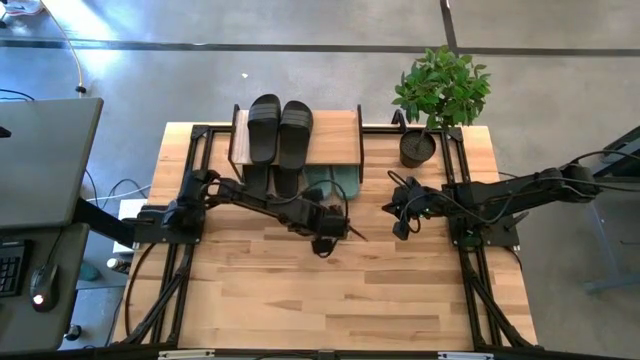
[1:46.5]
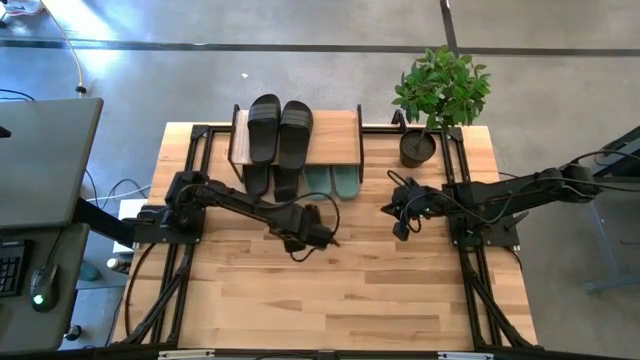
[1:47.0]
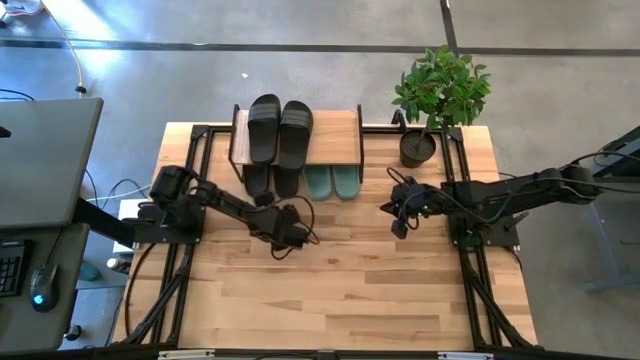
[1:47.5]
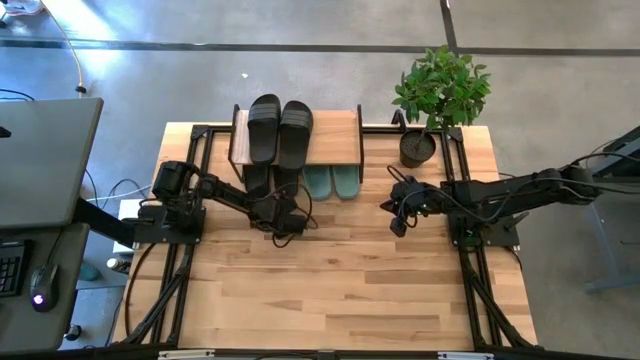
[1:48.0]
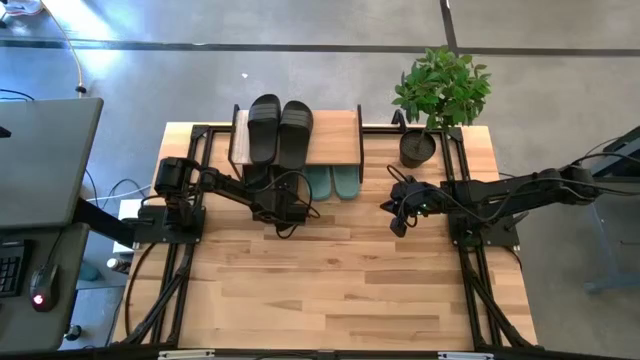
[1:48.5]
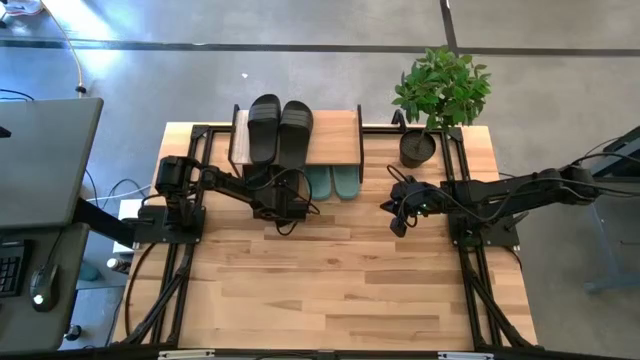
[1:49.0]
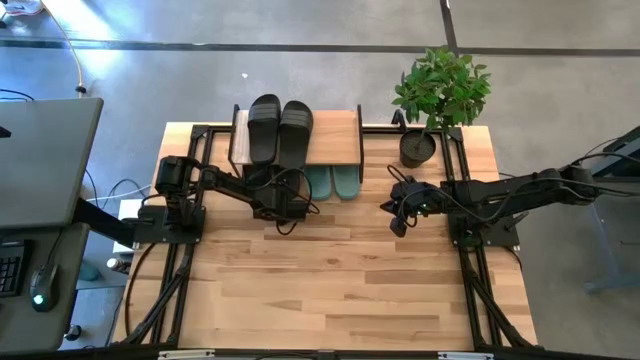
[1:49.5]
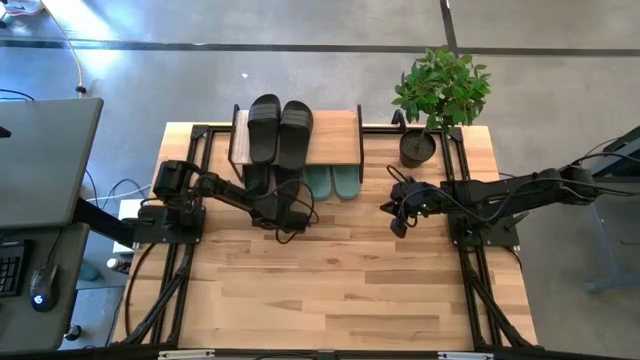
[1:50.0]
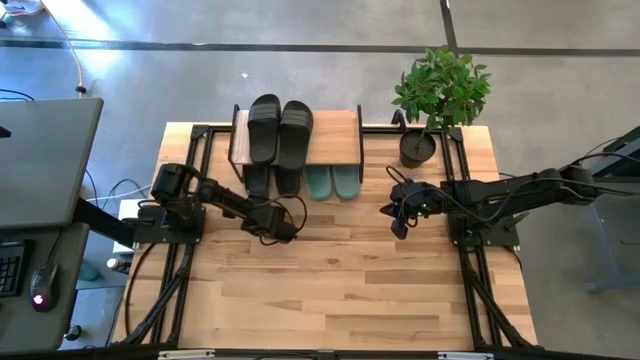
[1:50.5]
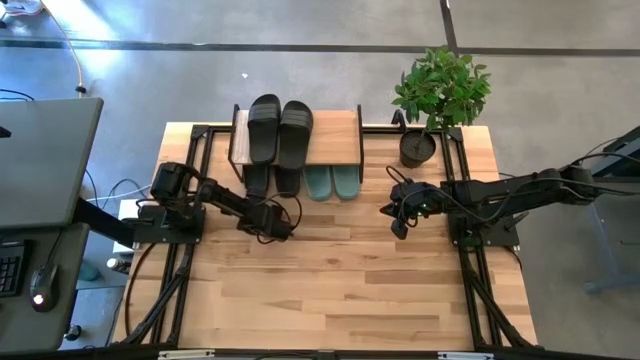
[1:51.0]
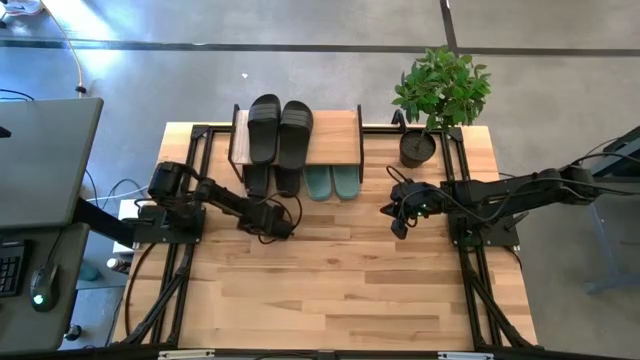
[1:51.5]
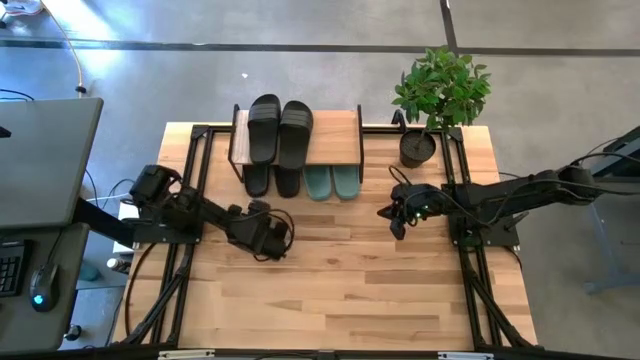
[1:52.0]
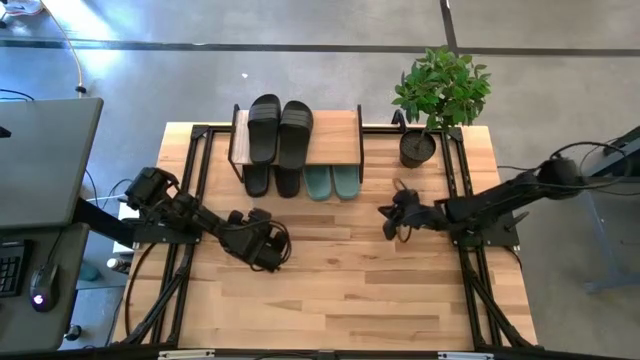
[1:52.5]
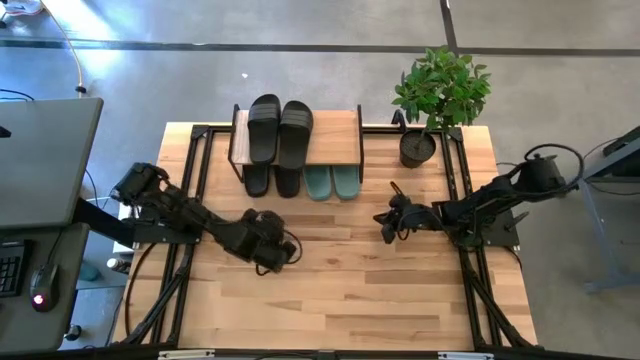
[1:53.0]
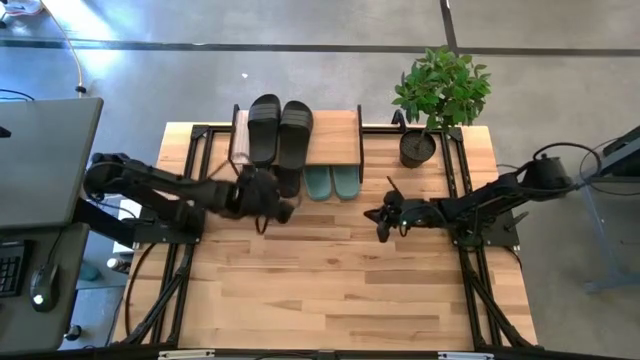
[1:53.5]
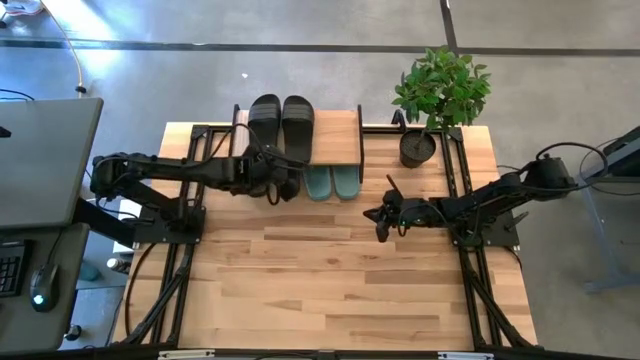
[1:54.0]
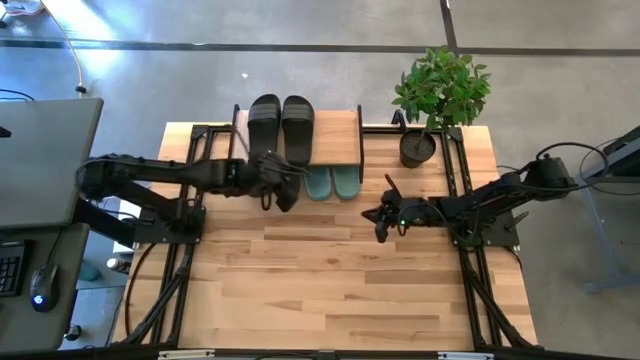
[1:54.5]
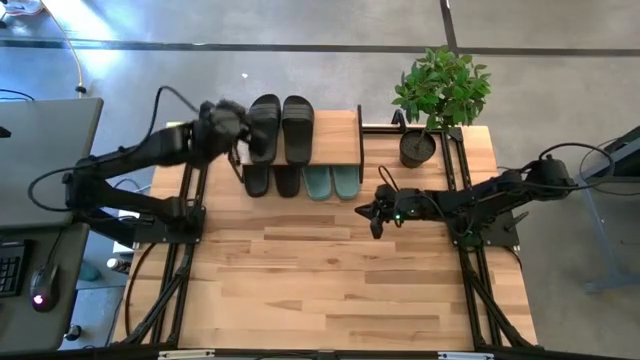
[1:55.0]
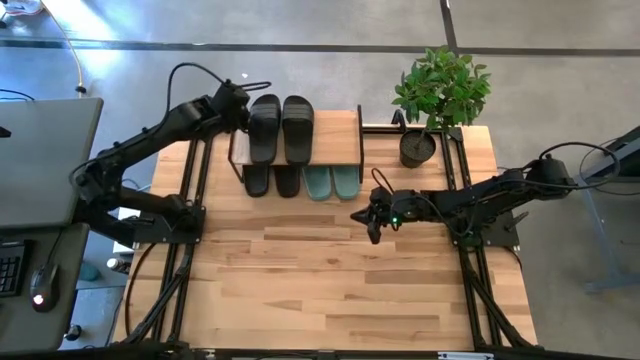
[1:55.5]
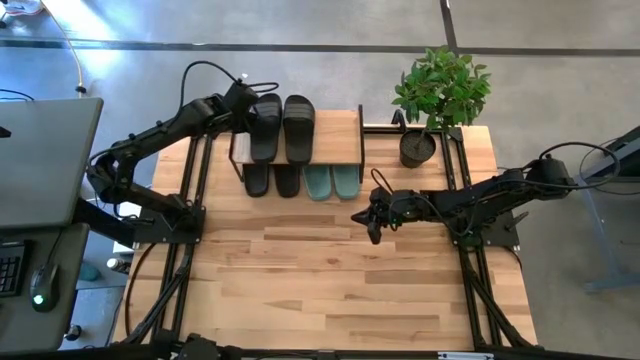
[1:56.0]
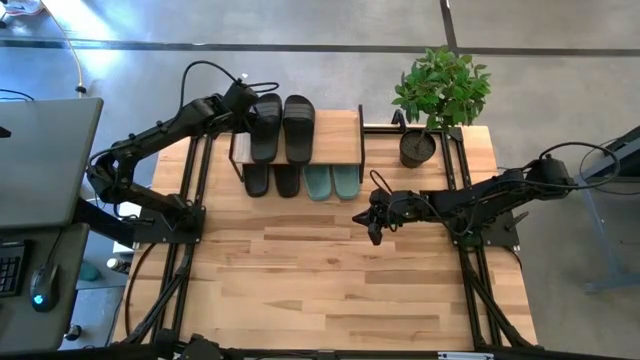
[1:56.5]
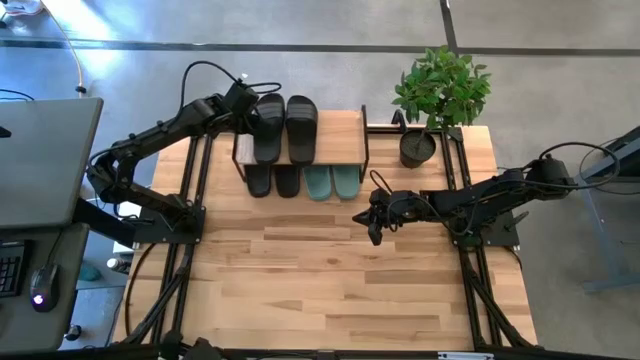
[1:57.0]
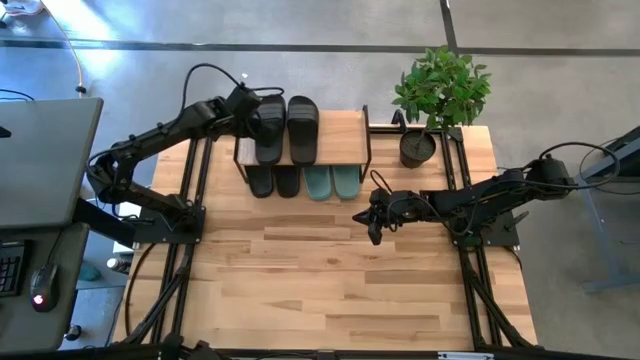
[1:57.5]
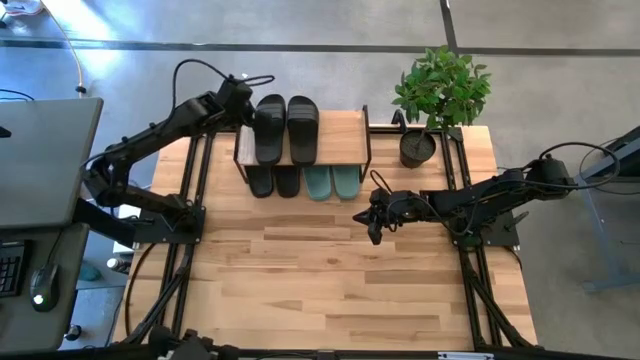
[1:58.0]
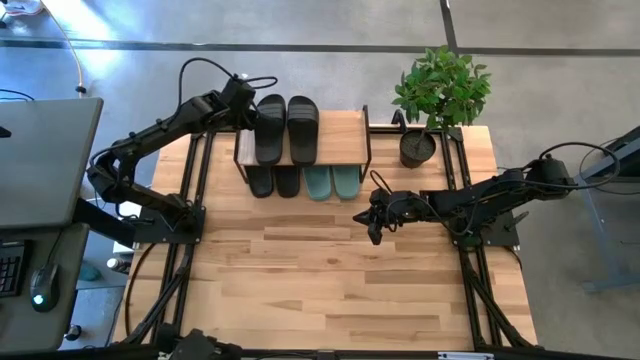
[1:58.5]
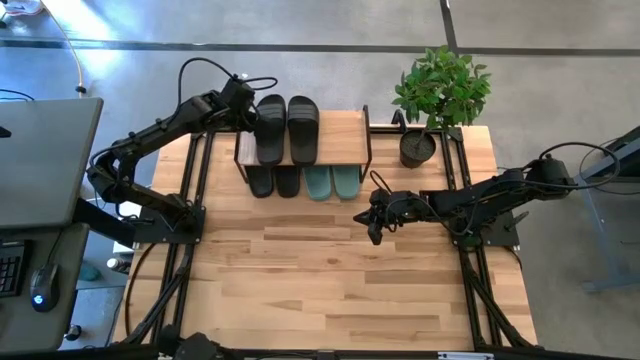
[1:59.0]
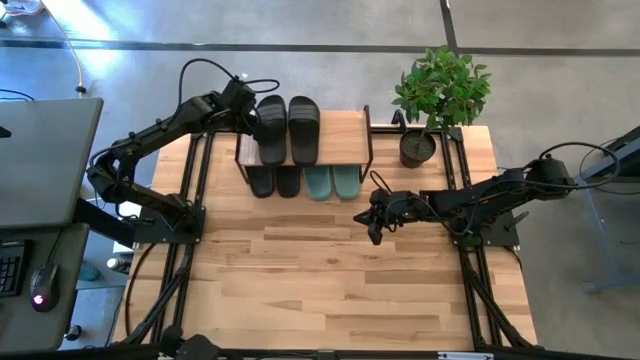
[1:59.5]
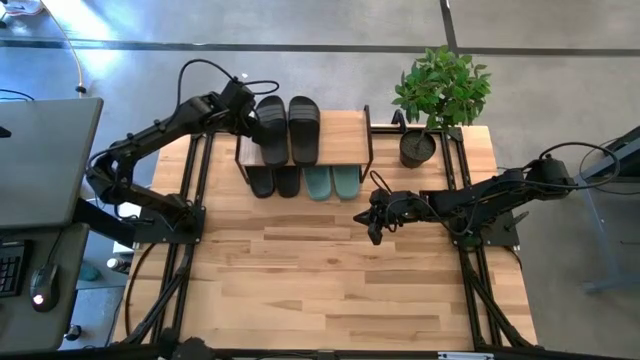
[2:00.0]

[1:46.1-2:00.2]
Task: Pick and place slides into the shelf
Adjust the black slides

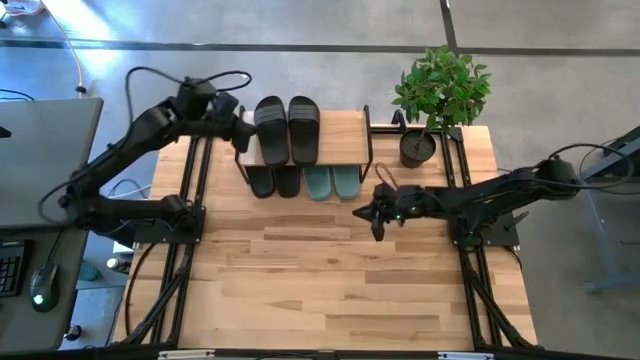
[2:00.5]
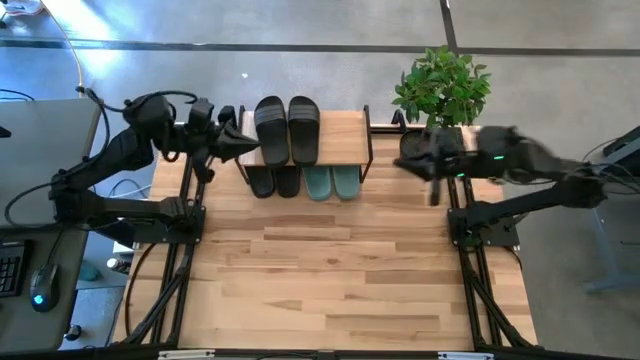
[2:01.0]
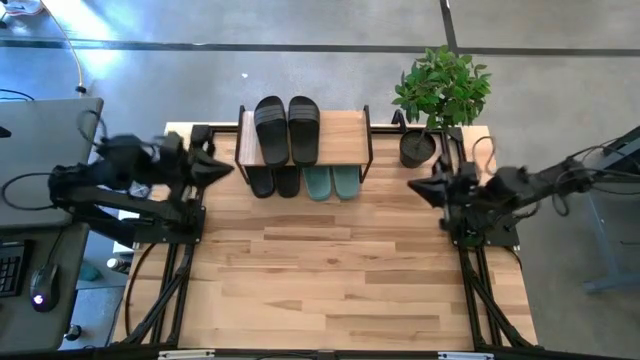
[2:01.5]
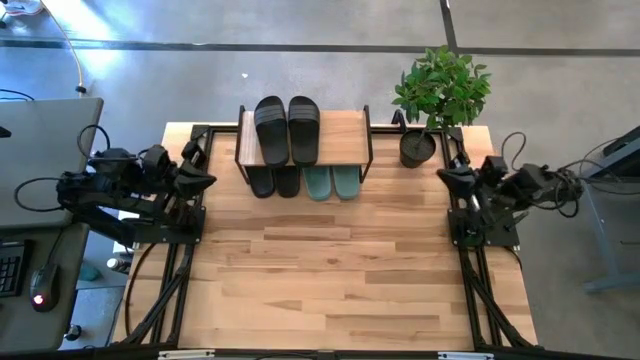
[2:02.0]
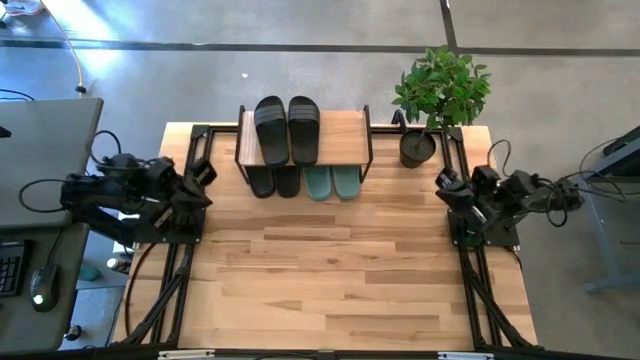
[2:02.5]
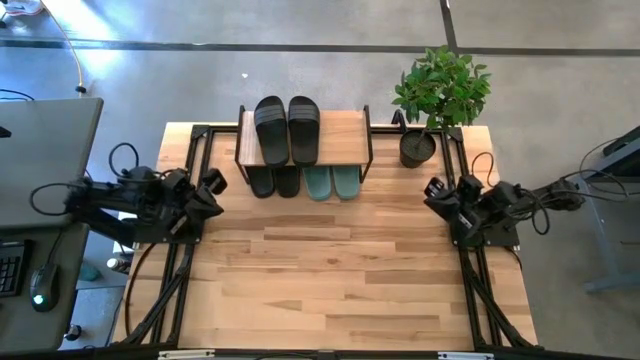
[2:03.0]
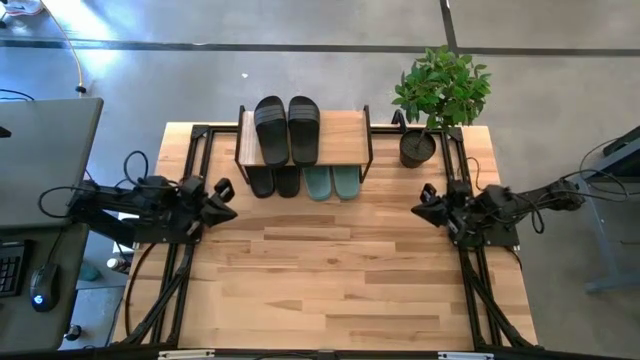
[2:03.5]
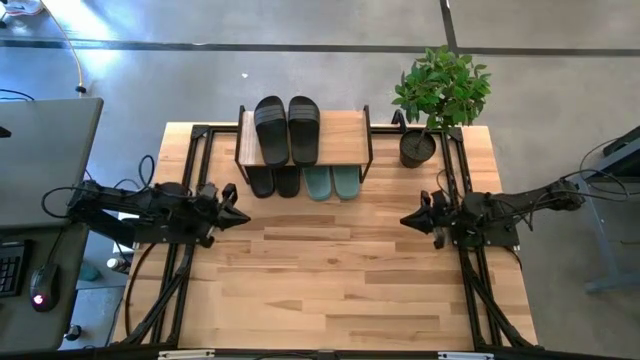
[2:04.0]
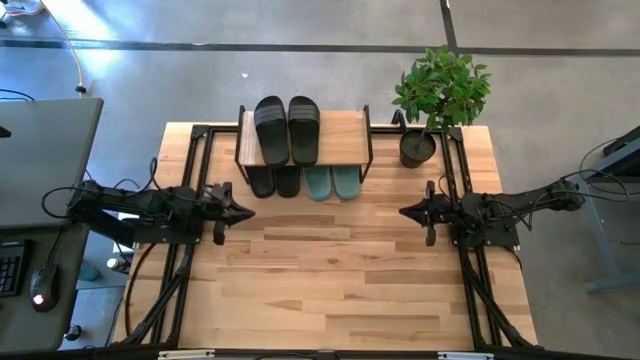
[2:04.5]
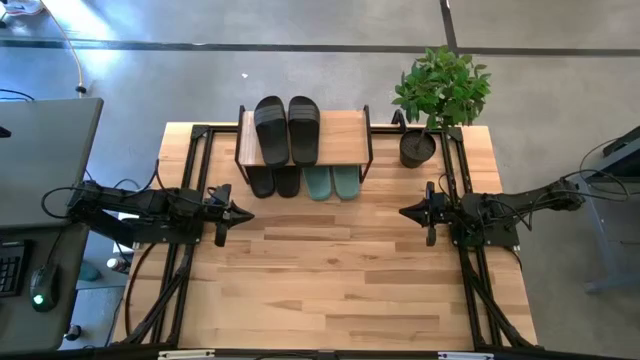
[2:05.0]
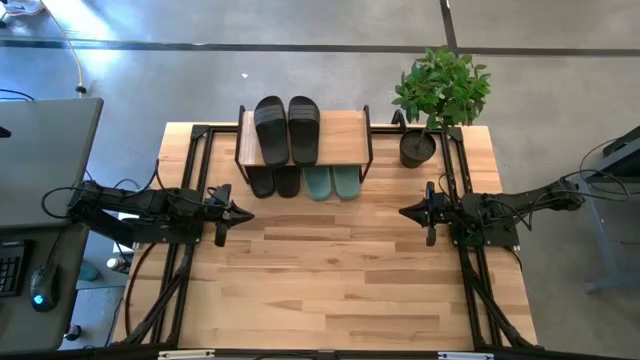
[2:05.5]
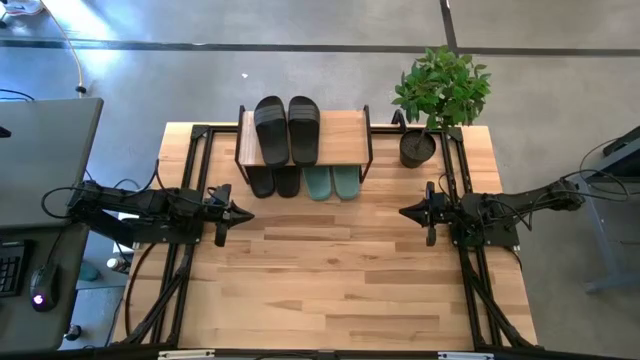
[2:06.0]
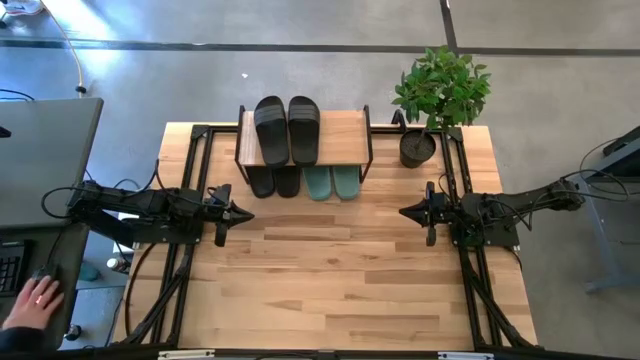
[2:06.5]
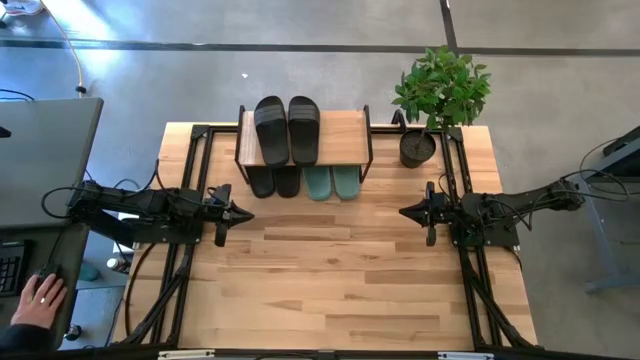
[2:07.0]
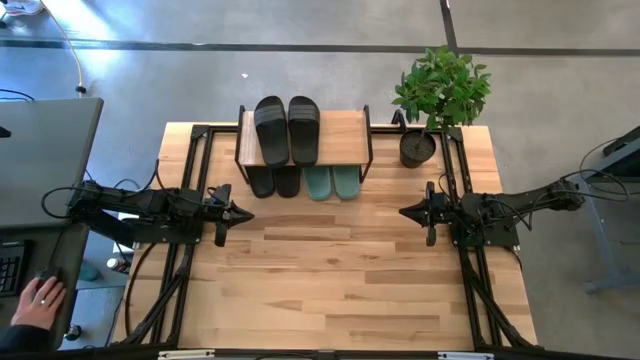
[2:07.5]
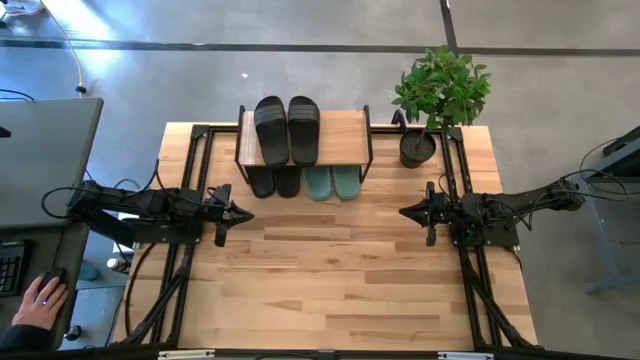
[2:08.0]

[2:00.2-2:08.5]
Return to Home Position

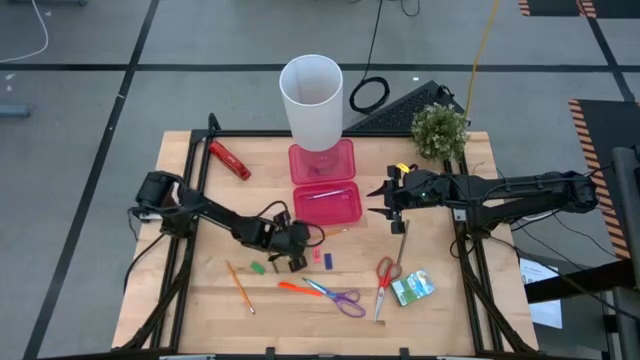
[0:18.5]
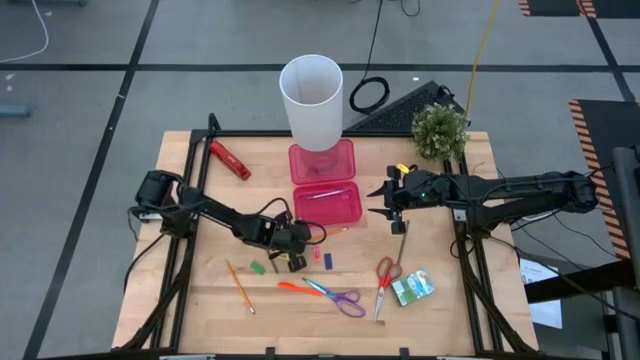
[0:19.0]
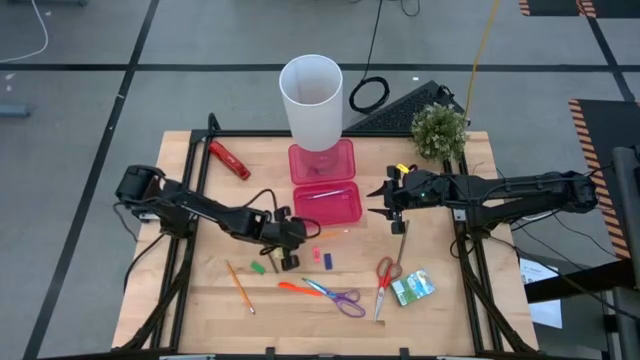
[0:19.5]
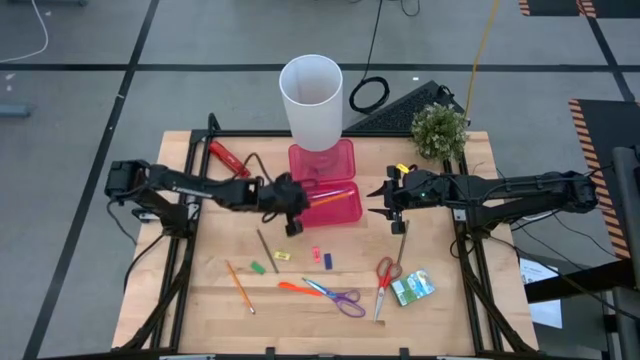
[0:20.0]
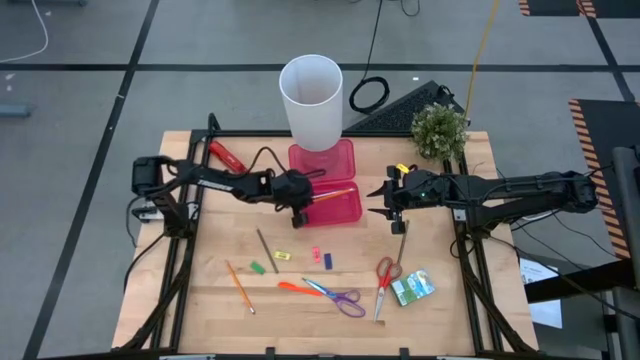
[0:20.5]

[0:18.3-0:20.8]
Task: Pack school essentials
Put the top yellow pencil into the pink supply box
